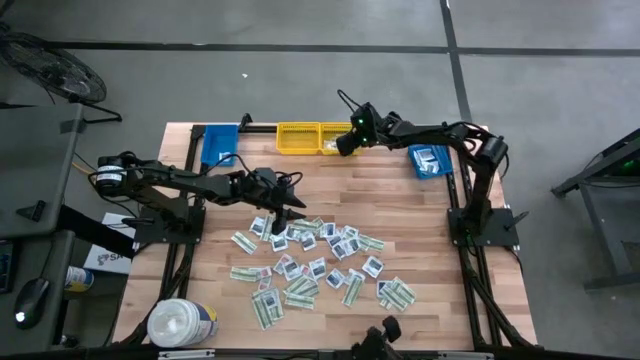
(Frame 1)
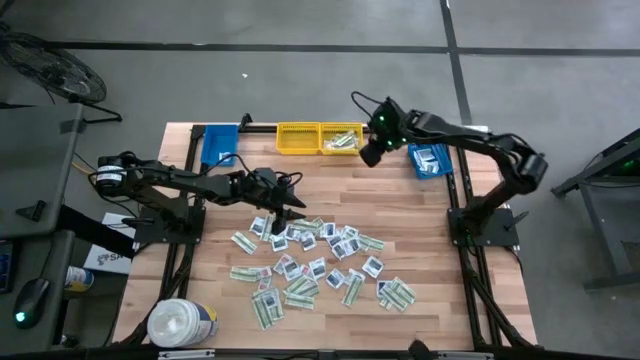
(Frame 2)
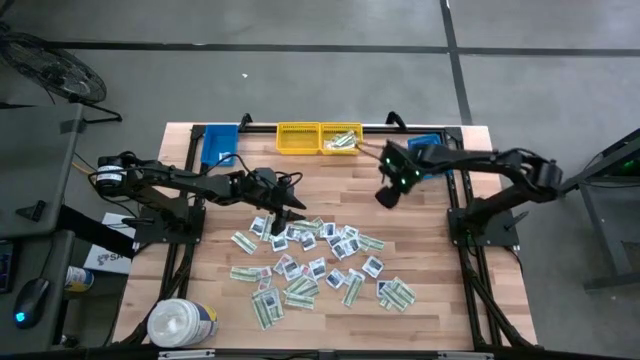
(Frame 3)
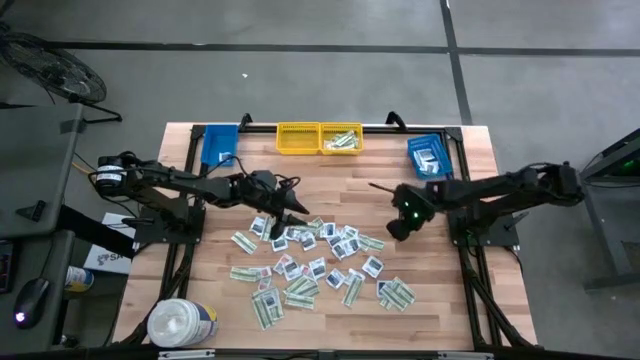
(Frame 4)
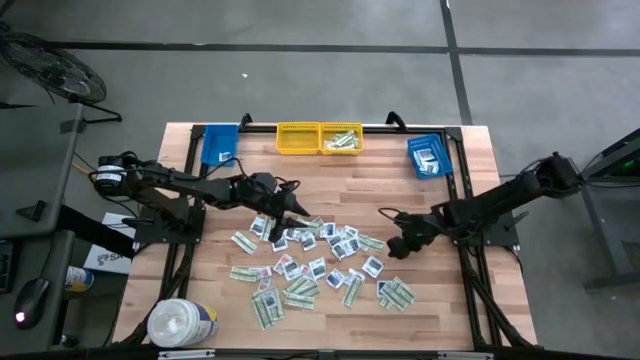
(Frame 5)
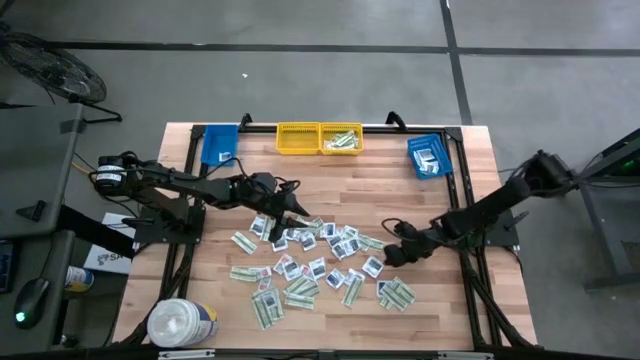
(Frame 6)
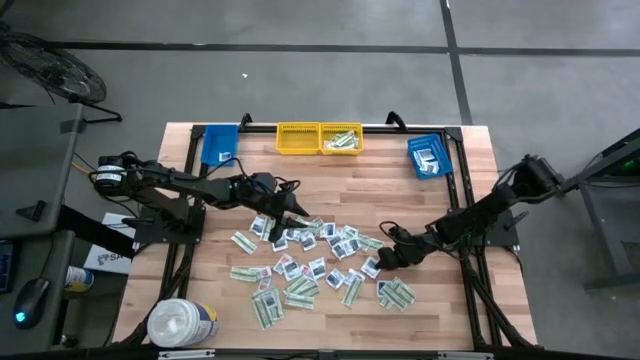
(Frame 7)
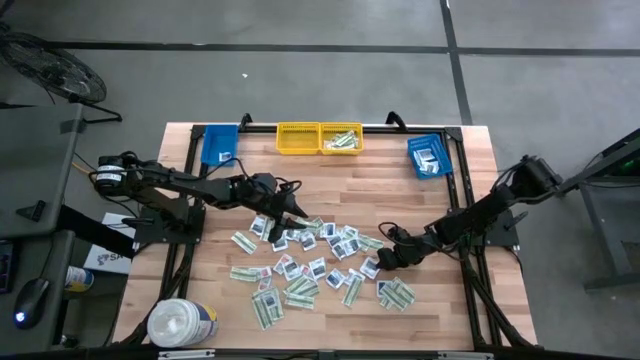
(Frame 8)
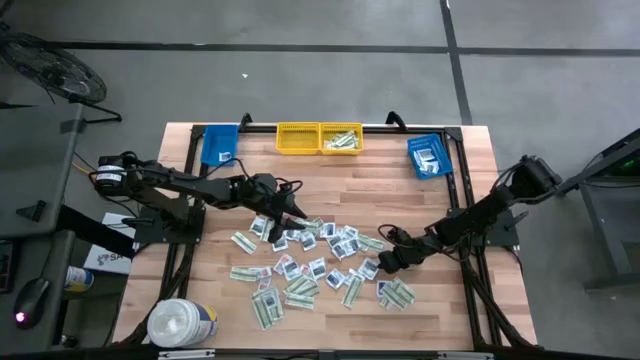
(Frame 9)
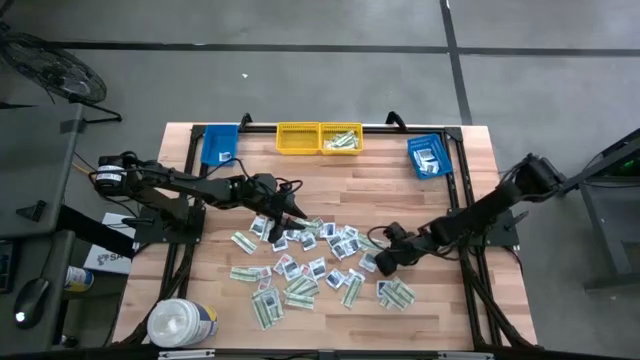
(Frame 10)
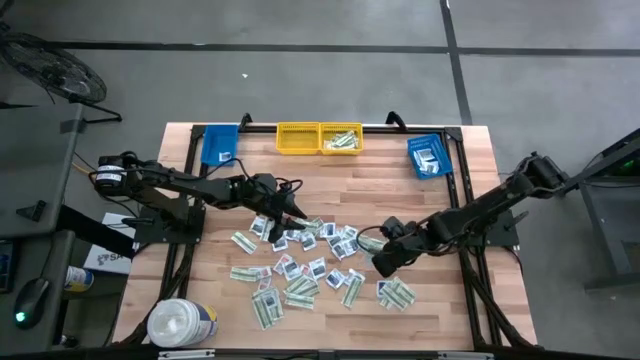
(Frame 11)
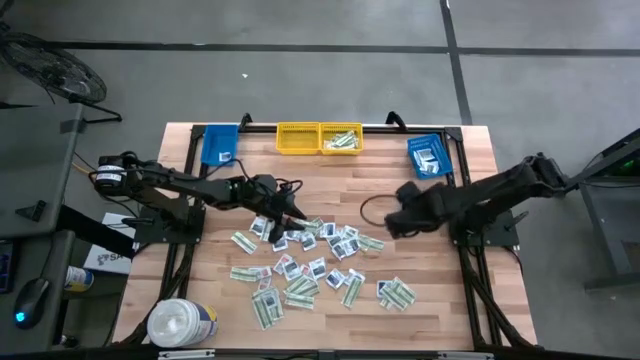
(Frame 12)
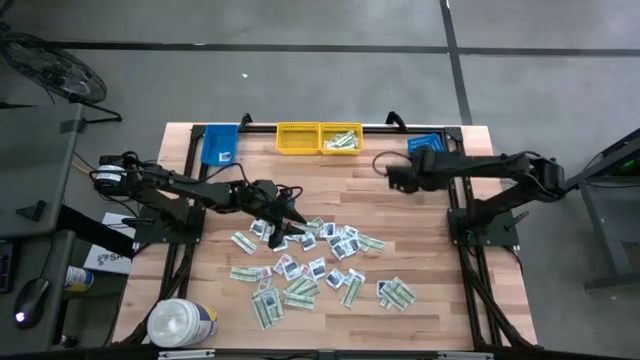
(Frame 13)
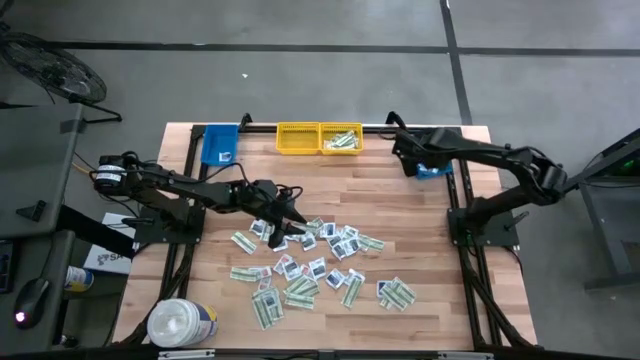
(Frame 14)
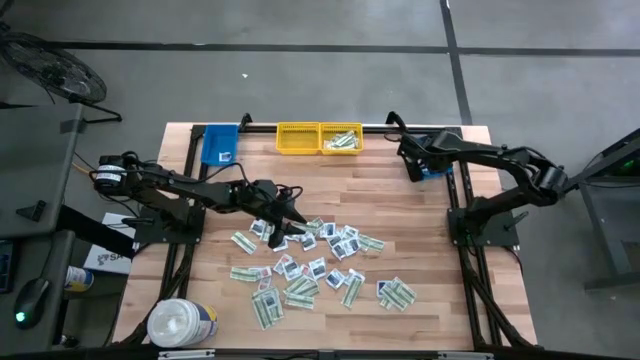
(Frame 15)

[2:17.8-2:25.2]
Task: Pick & Place First Aid Supplies
Put the black towelette pack into the right blue bin

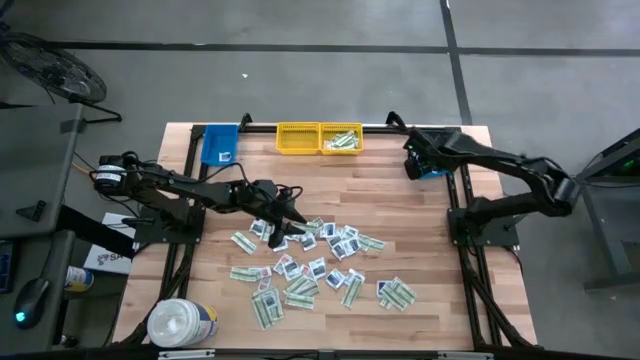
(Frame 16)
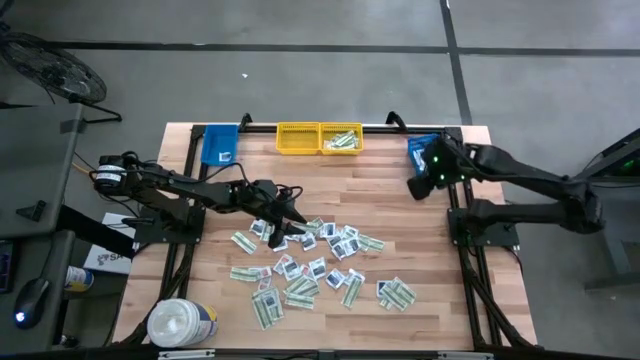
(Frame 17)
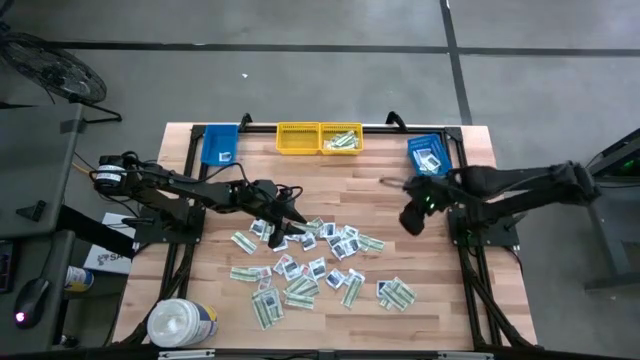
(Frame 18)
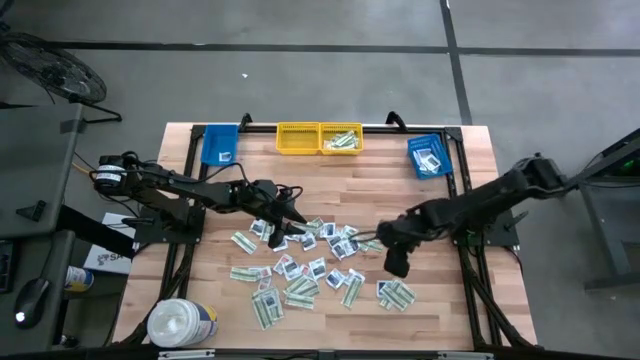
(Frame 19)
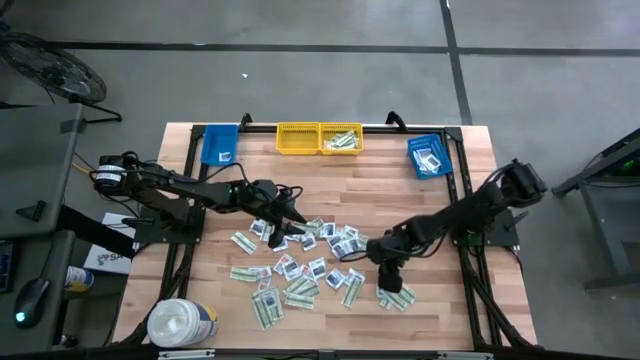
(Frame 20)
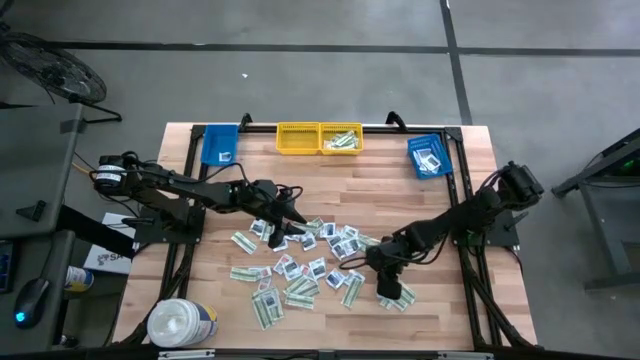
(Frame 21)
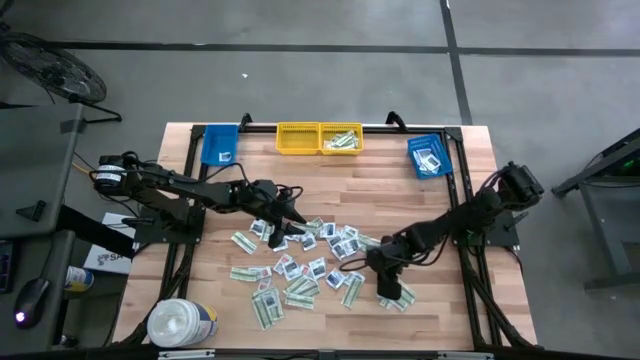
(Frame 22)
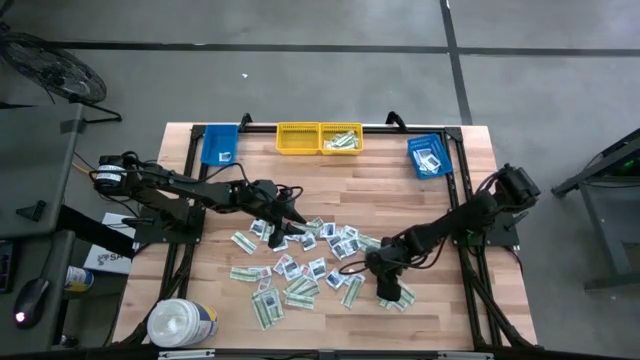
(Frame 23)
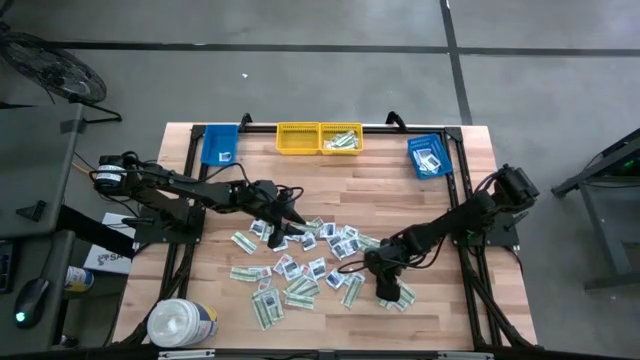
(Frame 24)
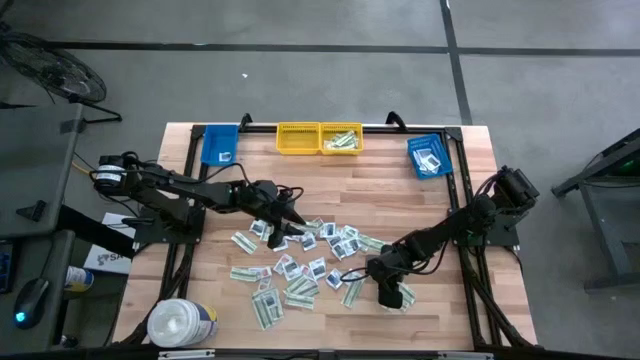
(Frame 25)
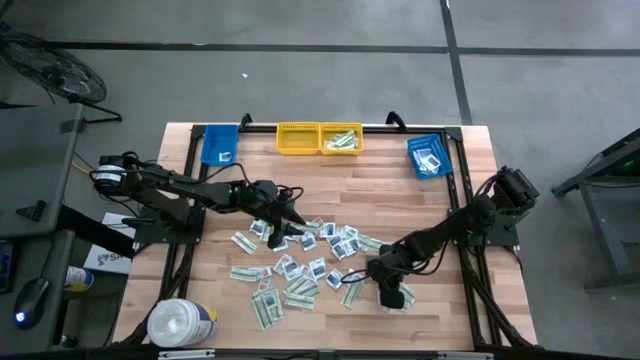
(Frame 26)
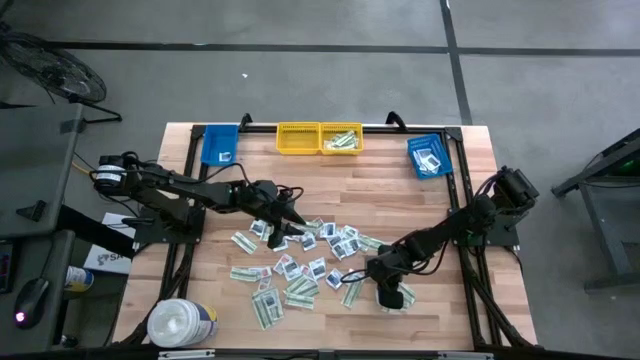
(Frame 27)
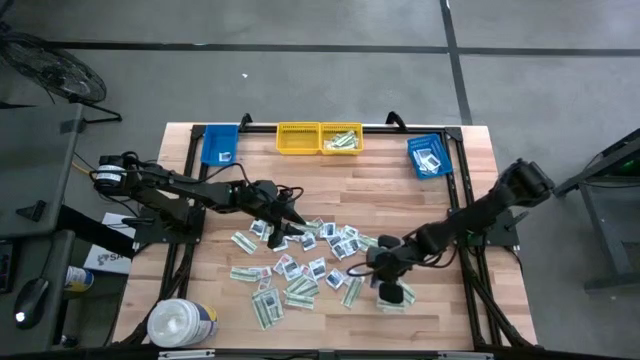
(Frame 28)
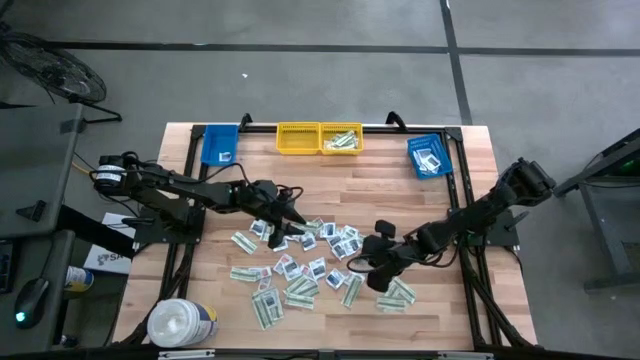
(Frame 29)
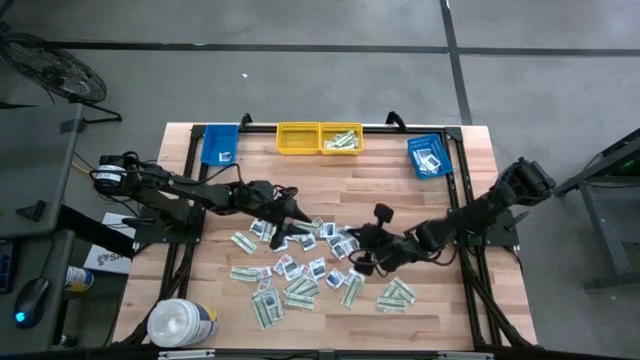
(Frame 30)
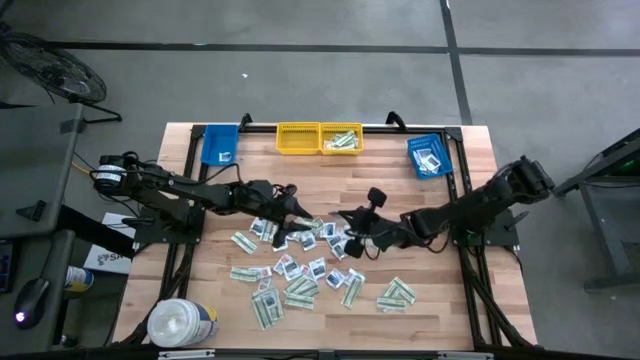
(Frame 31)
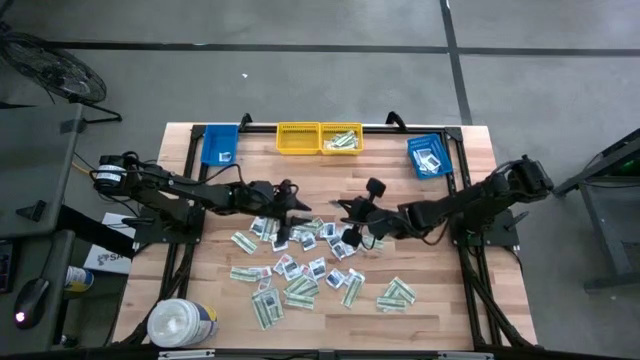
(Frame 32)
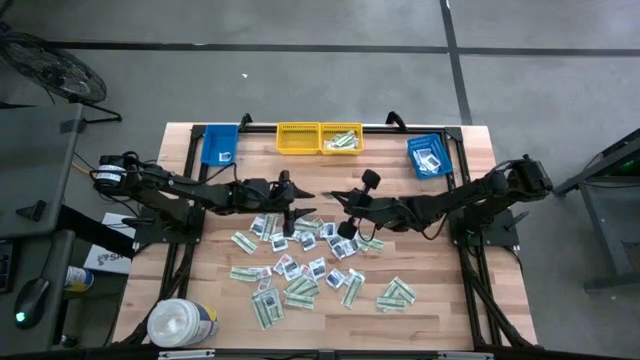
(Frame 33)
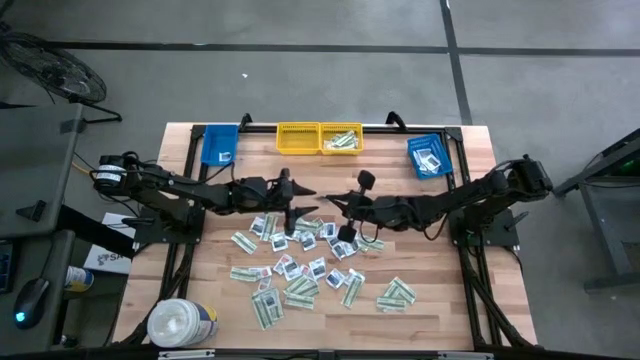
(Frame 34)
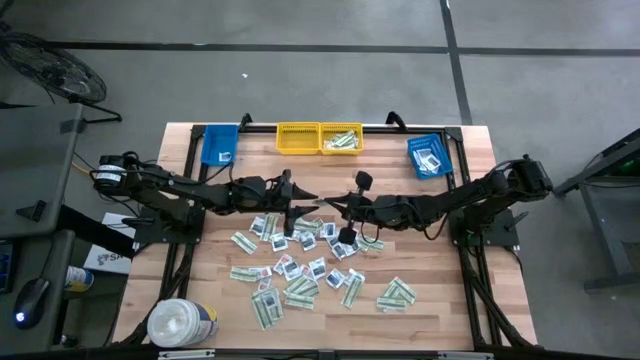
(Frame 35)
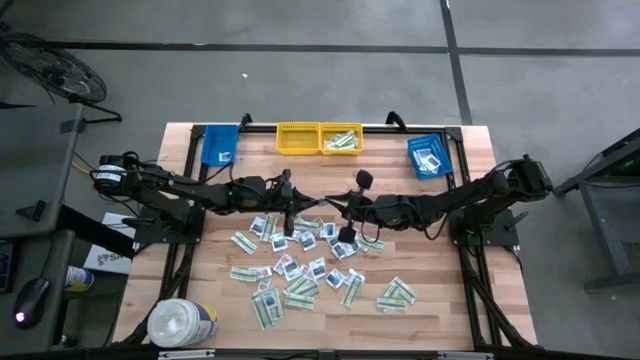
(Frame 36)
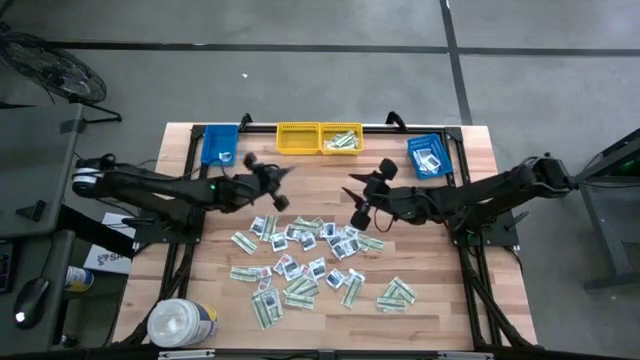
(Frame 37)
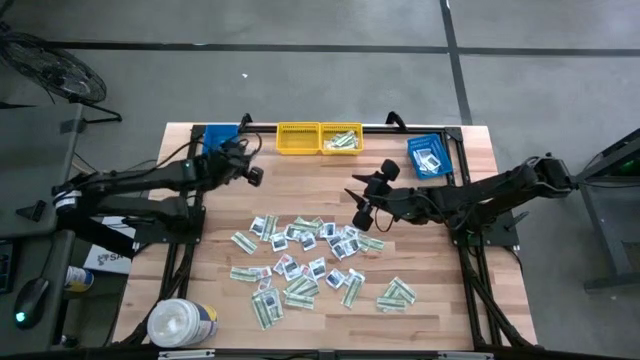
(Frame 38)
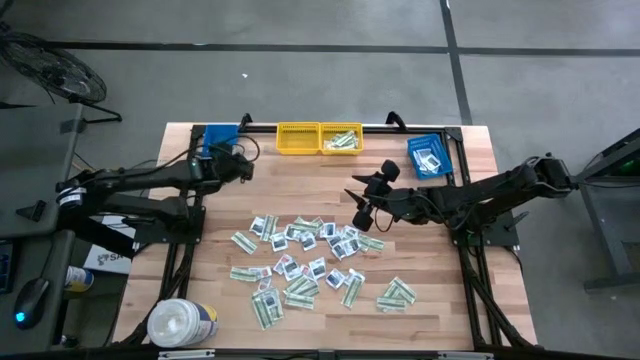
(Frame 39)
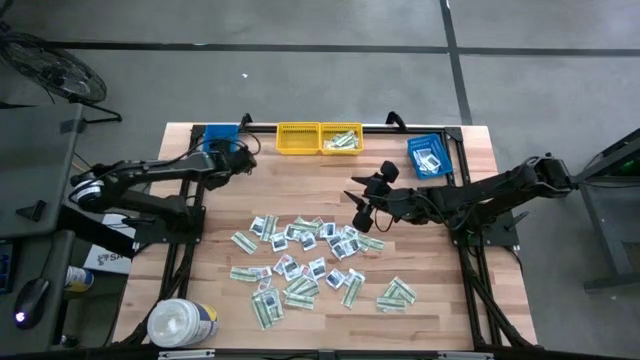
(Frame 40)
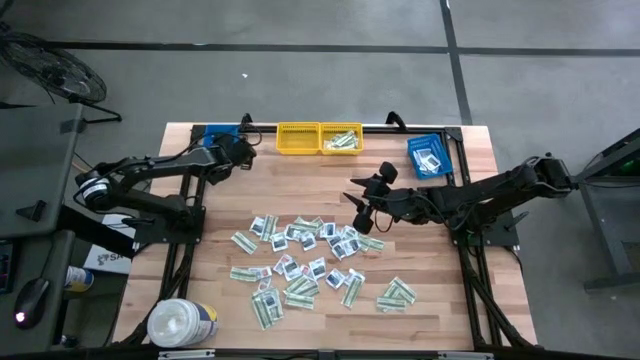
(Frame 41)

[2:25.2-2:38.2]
Put the blue alcohol pad into the left blue bin
